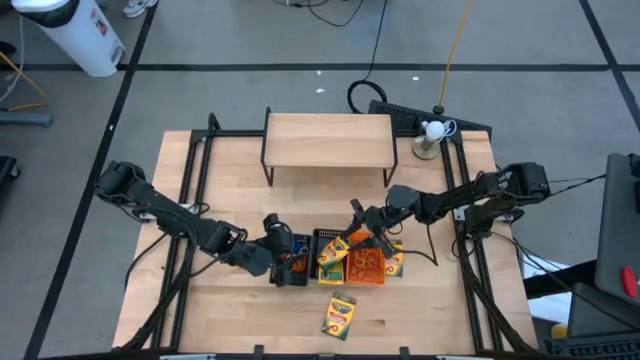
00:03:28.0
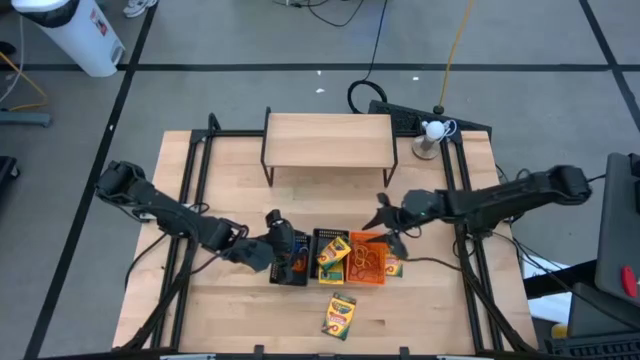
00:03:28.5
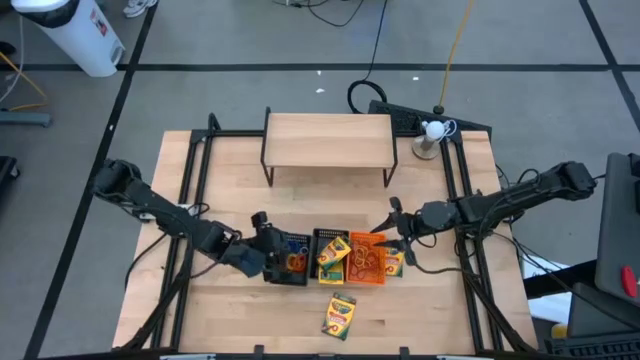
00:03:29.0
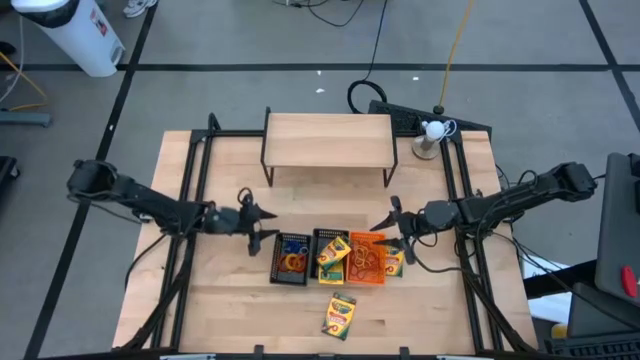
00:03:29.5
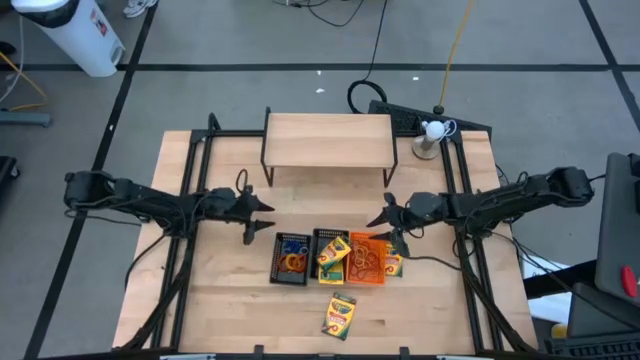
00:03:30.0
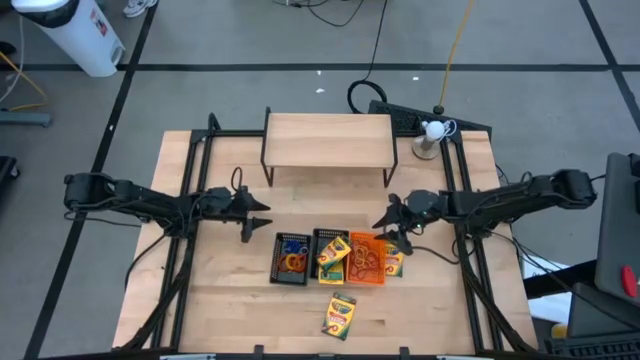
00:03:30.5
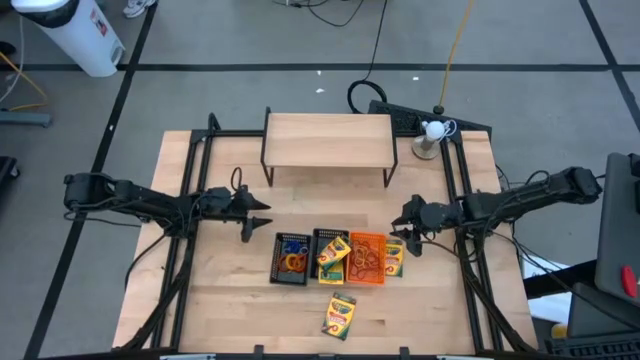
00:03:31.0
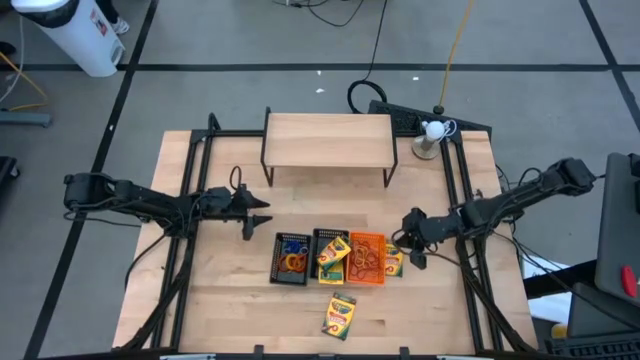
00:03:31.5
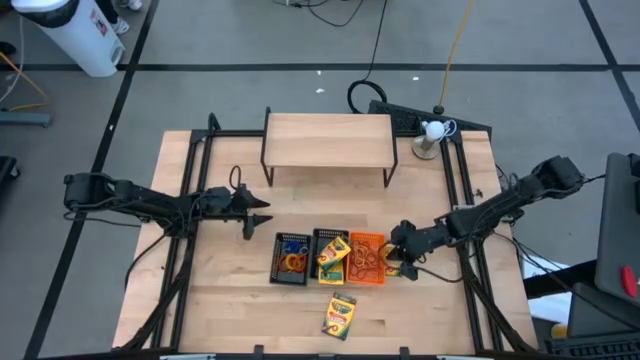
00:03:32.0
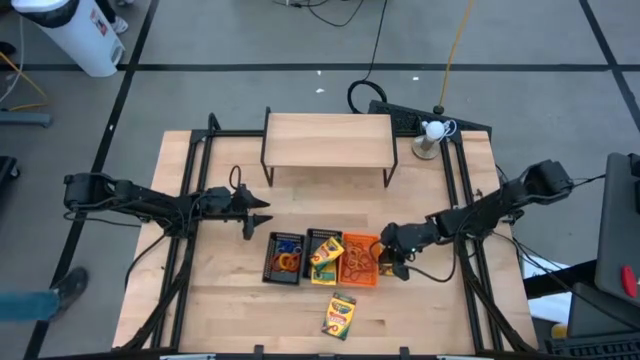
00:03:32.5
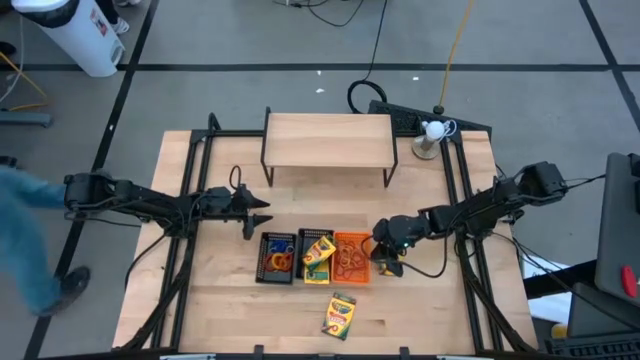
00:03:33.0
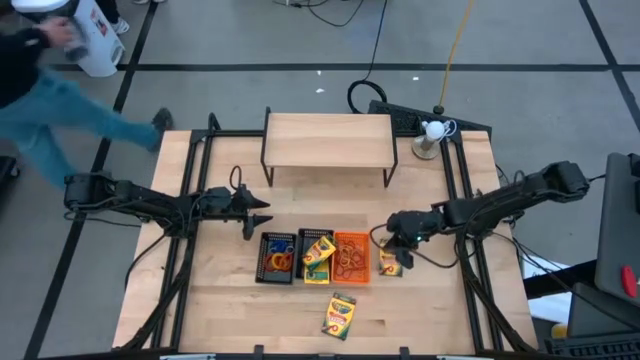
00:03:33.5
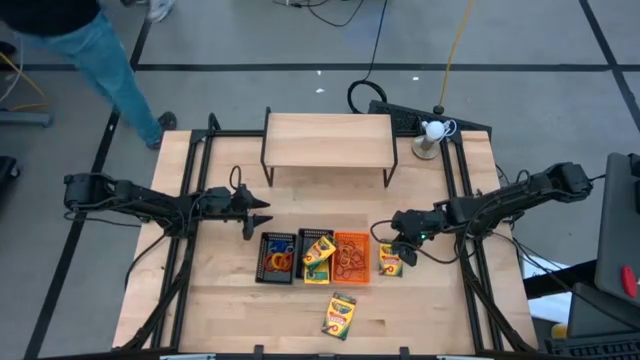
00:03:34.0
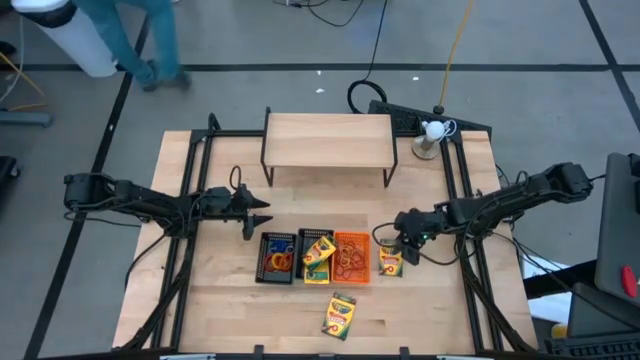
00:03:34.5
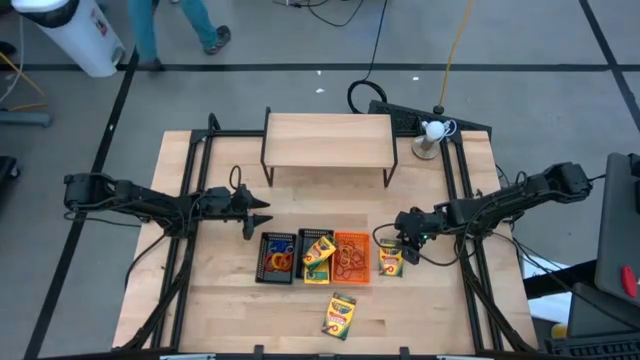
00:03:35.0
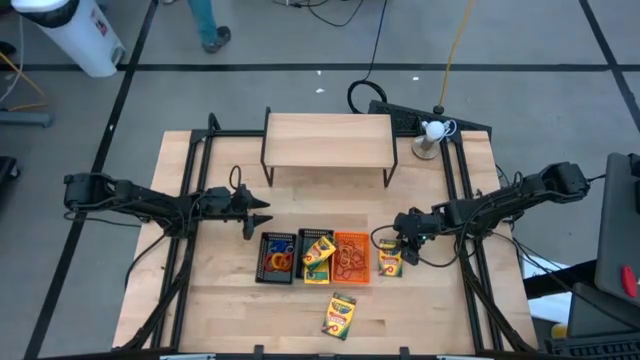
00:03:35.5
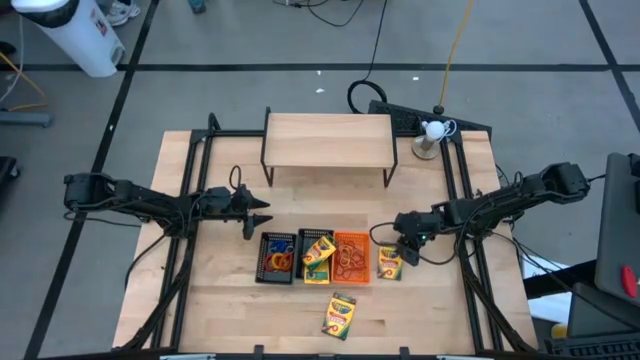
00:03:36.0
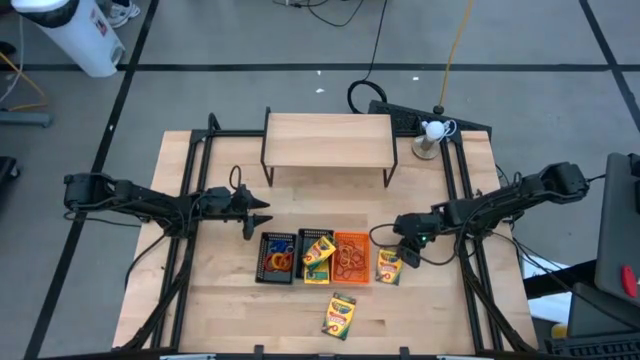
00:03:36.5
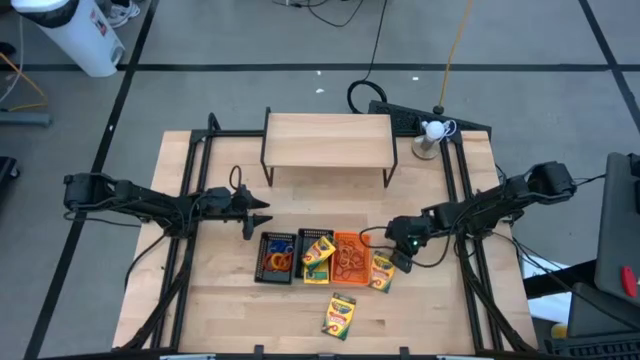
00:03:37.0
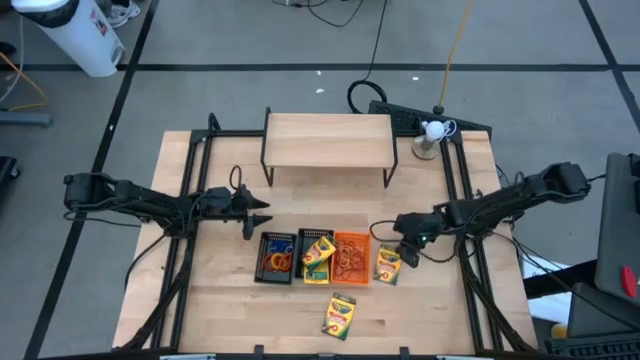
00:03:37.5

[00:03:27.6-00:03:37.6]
Task: Pick & Place Office Desk Supplies
Put the crayon box into the right black bin

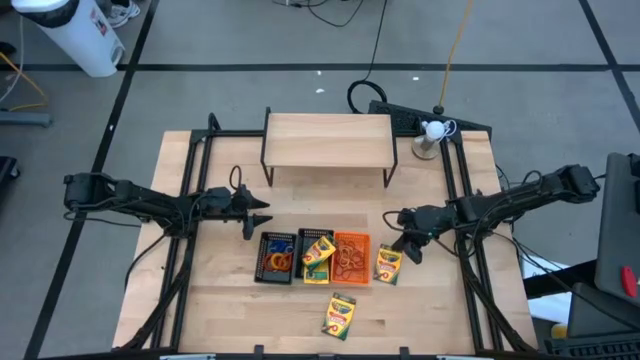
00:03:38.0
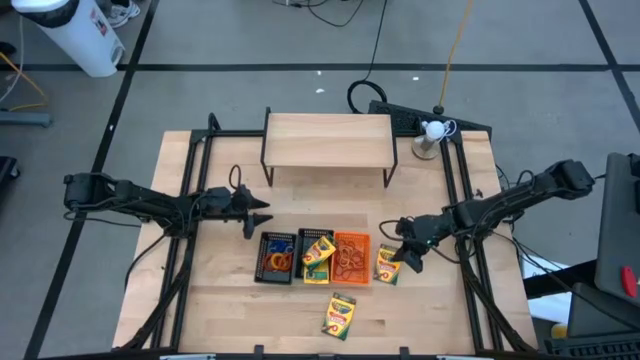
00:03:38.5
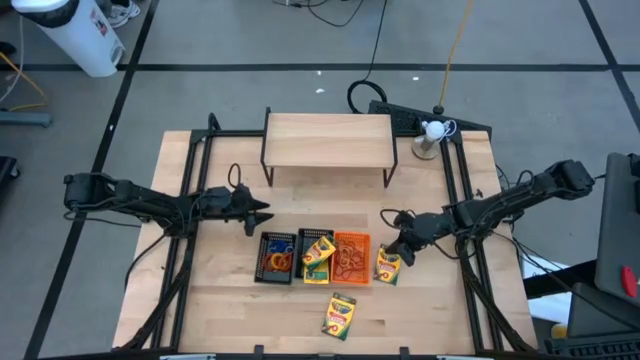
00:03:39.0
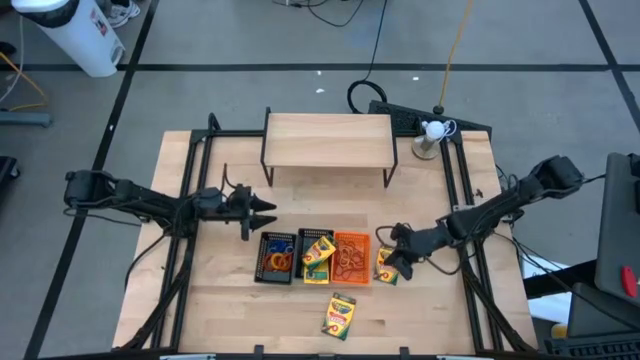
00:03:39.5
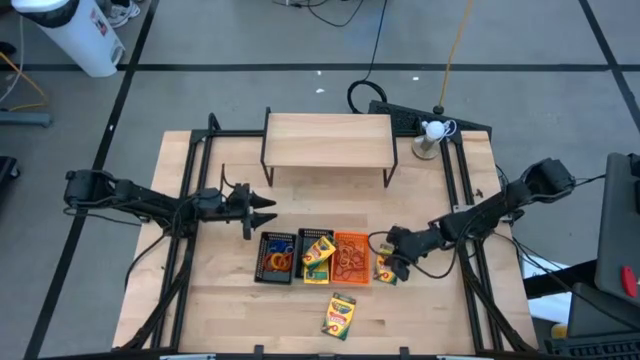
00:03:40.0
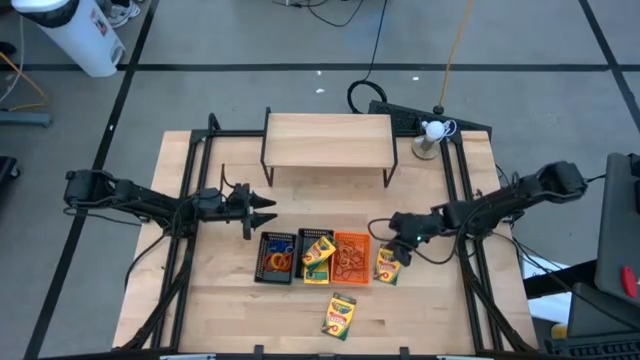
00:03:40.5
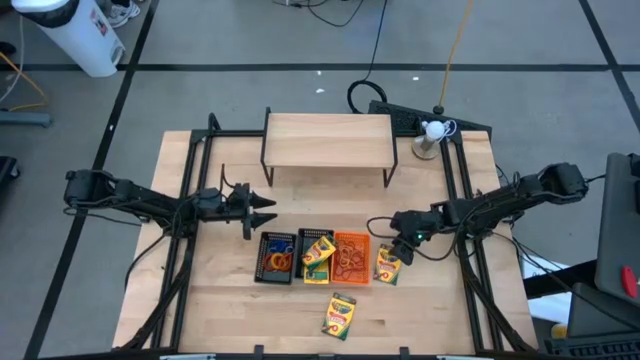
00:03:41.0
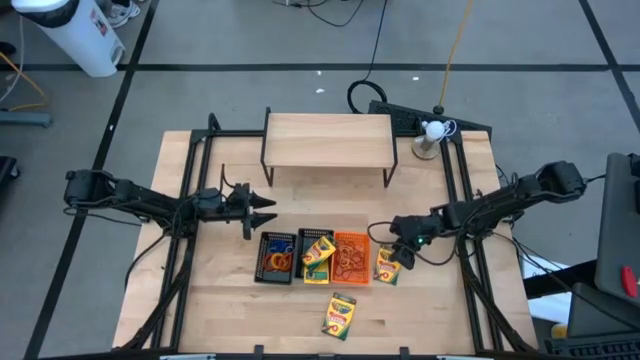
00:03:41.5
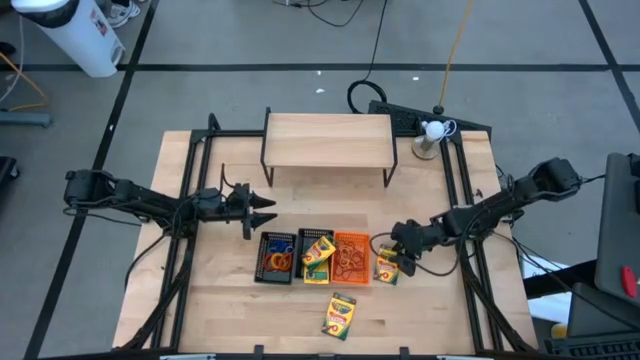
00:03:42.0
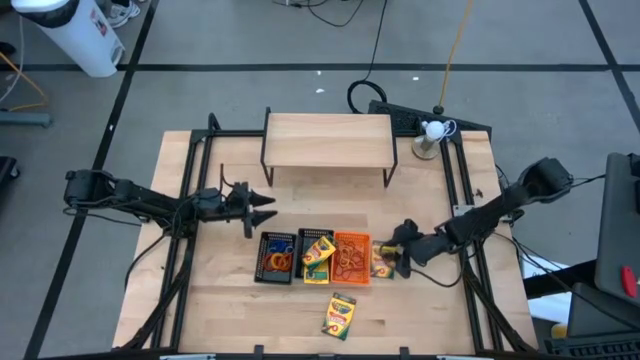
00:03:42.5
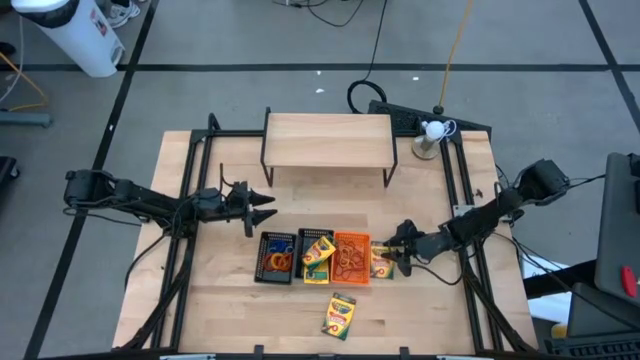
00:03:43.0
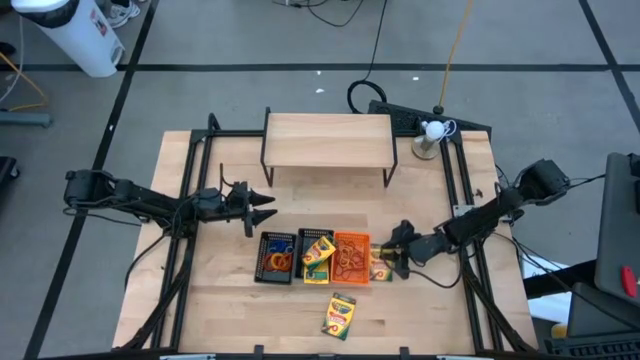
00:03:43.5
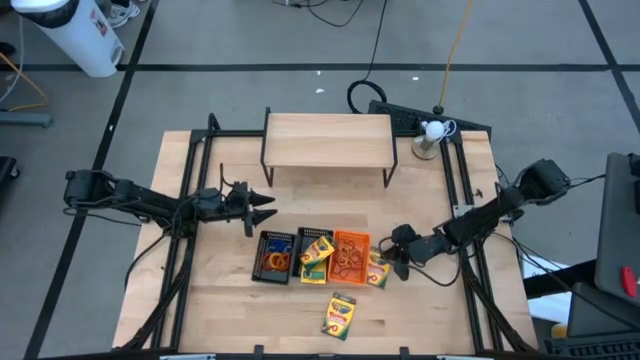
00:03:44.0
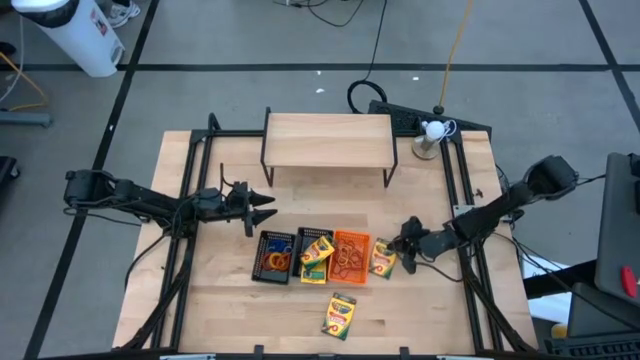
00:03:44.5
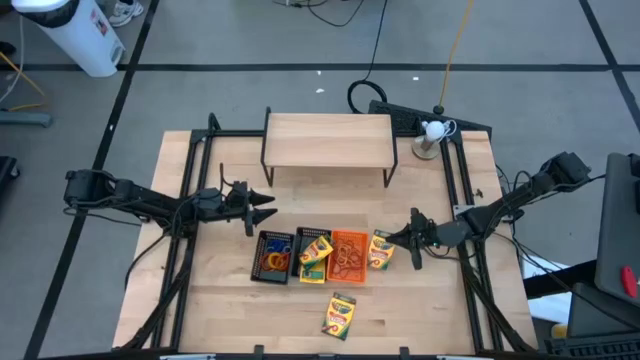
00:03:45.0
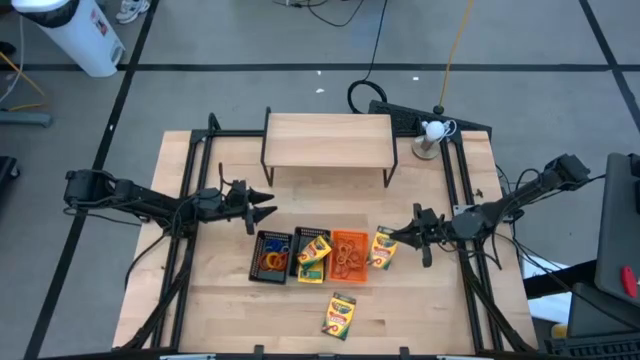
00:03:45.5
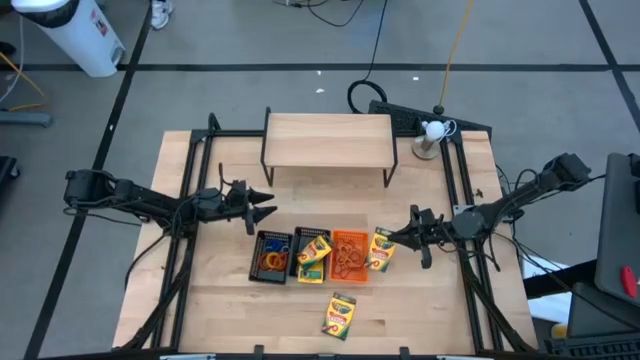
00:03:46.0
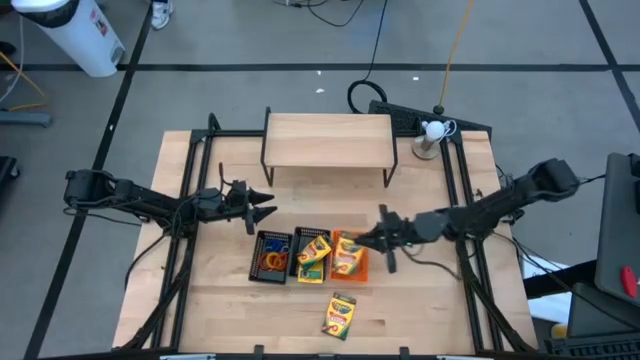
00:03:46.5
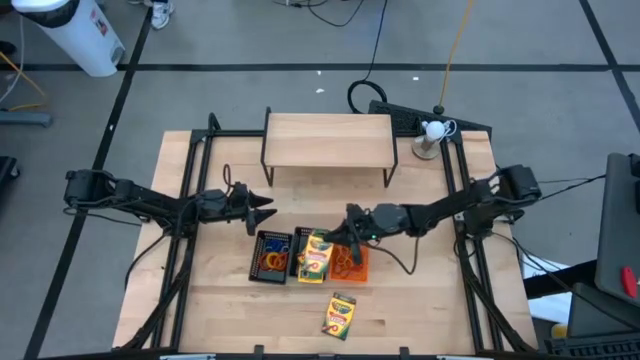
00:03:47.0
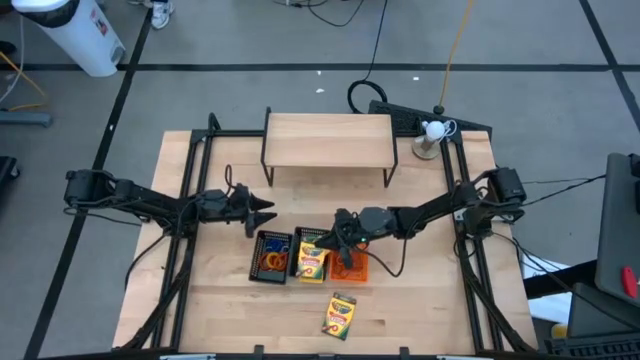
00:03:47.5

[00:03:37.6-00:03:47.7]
Put the crayon box into the right black bin

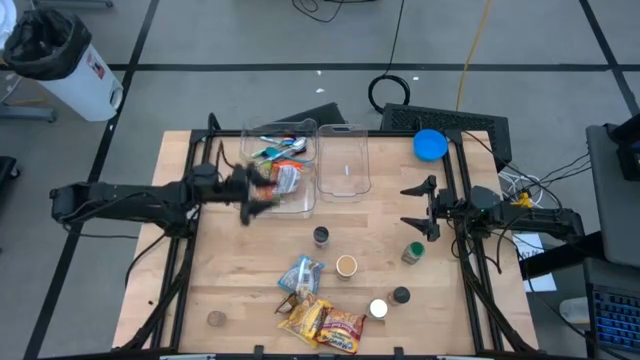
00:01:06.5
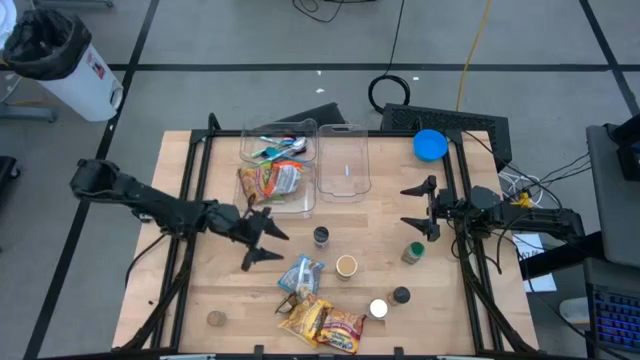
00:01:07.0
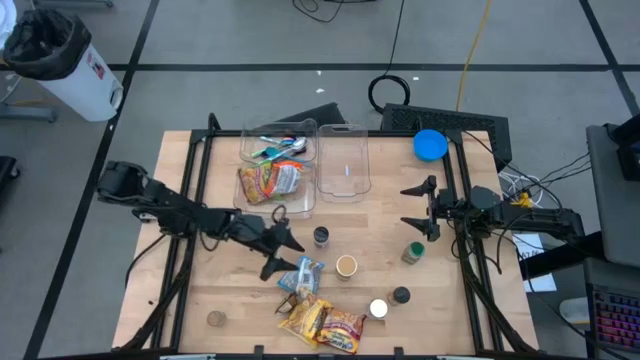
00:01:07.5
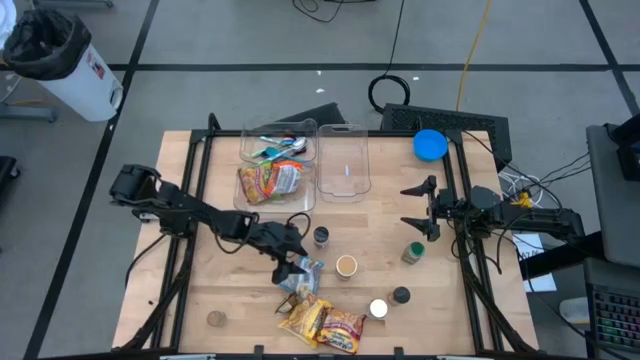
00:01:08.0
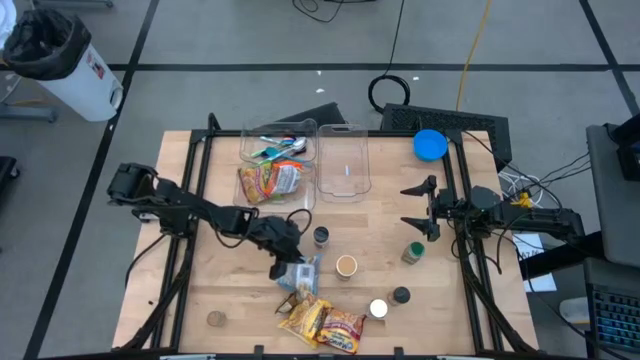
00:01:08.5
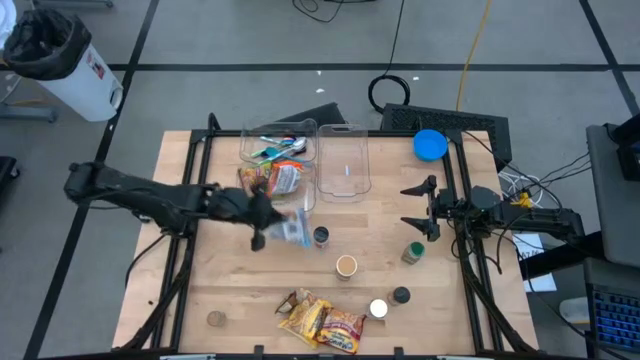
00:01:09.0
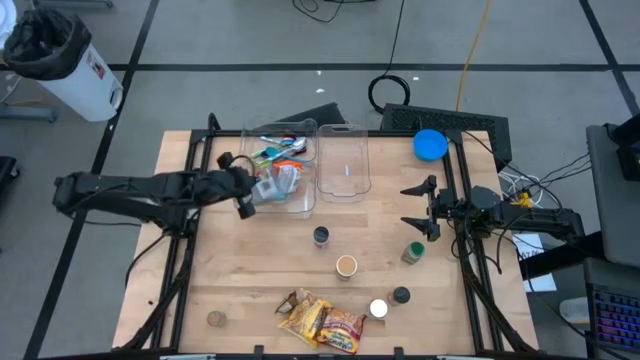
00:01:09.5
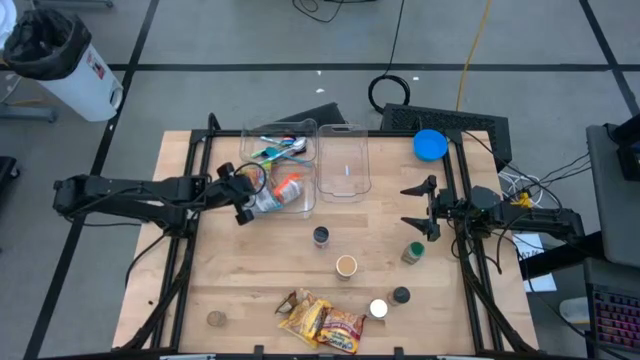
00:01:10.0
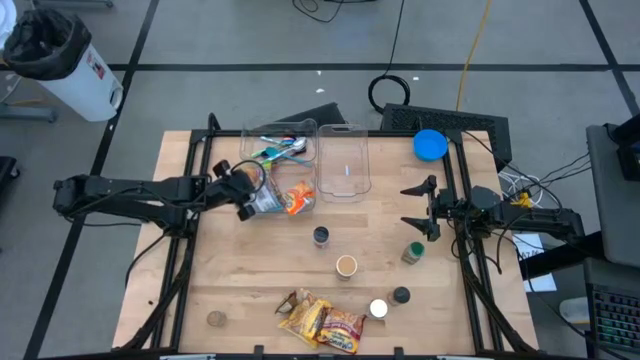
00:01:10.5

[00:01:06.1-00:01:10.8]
Task: Pick & Place Food Item
Put the blue noodle pack into the bottom left transparent bin
